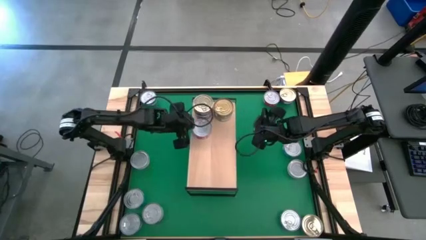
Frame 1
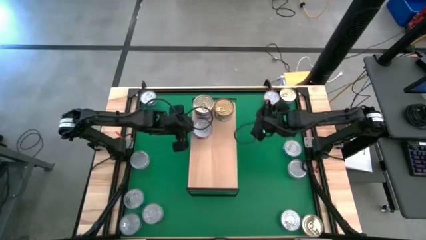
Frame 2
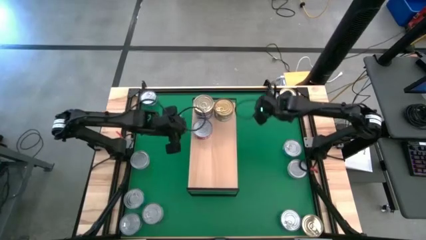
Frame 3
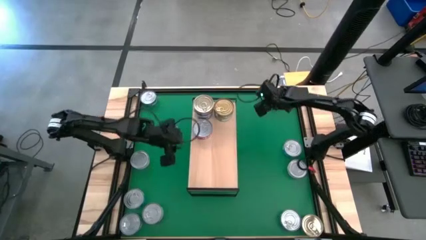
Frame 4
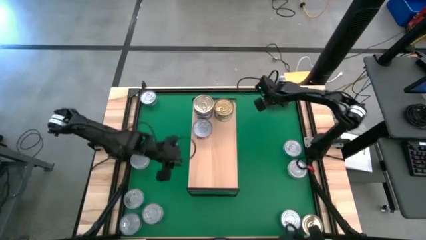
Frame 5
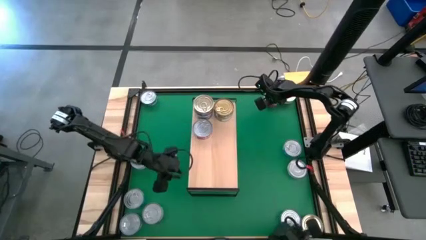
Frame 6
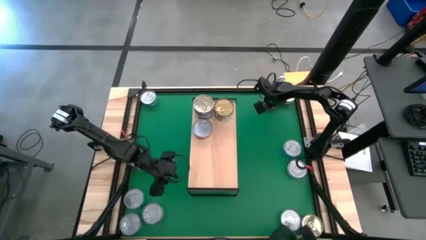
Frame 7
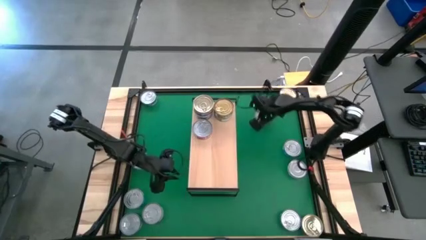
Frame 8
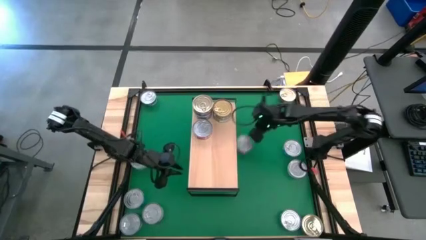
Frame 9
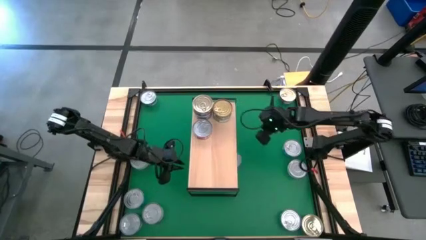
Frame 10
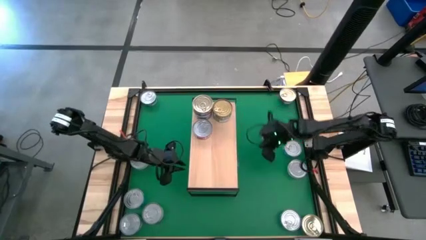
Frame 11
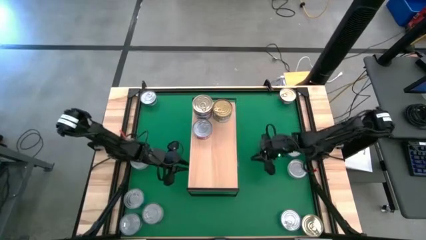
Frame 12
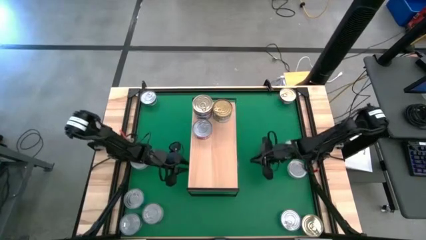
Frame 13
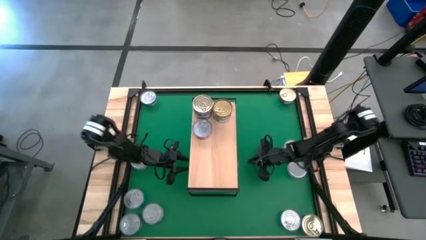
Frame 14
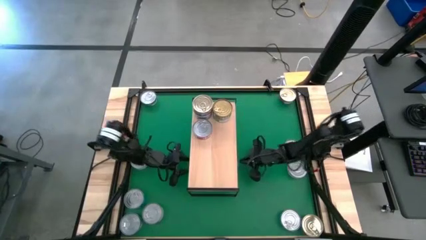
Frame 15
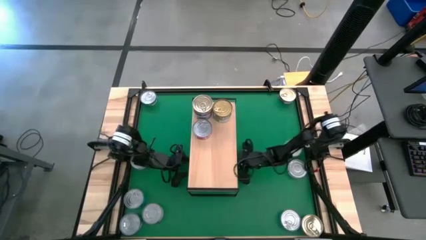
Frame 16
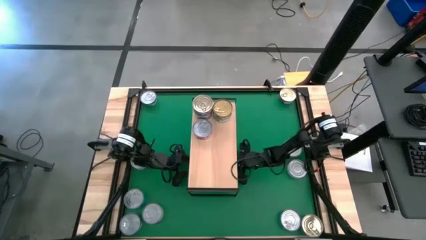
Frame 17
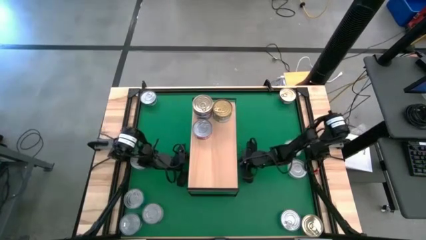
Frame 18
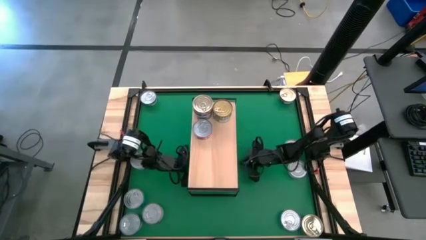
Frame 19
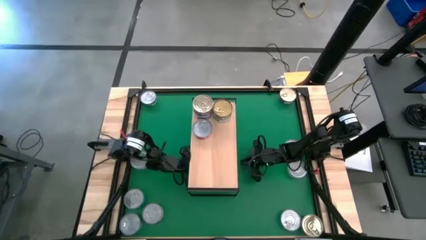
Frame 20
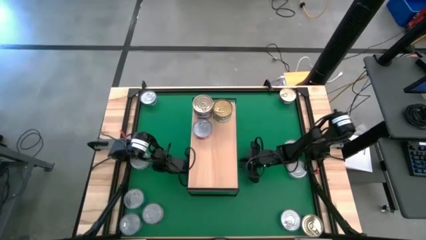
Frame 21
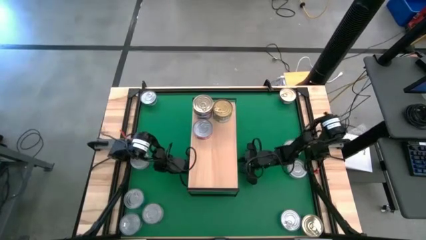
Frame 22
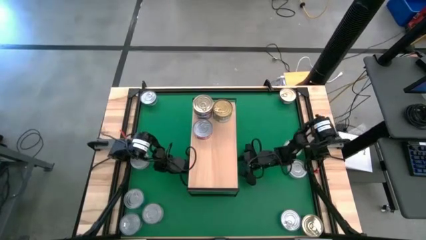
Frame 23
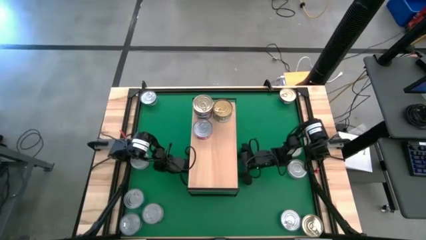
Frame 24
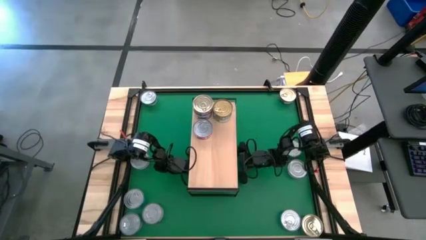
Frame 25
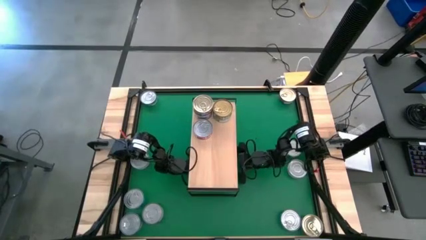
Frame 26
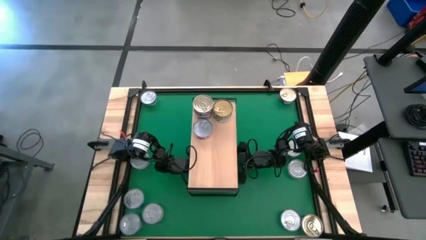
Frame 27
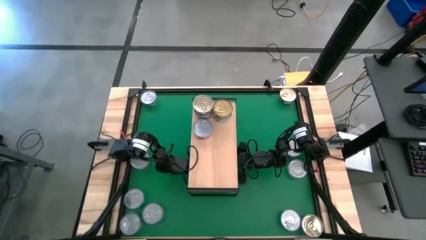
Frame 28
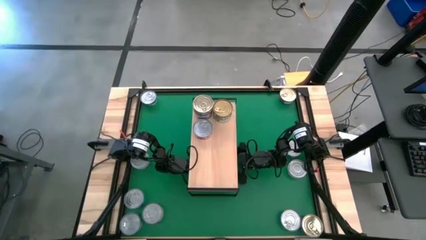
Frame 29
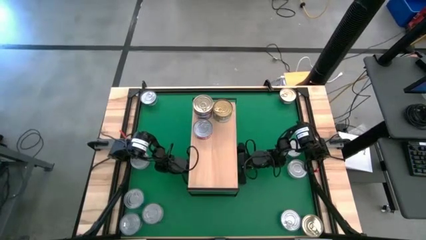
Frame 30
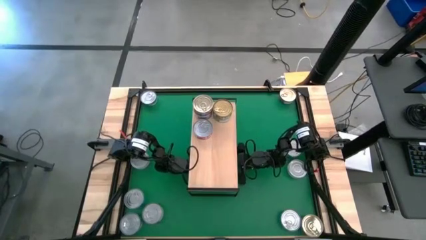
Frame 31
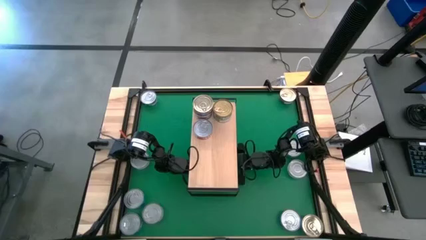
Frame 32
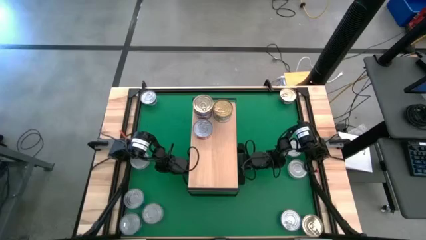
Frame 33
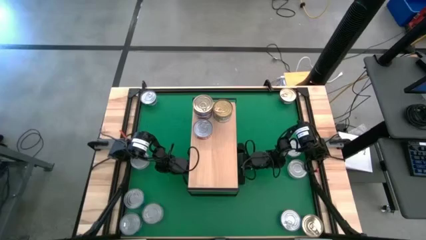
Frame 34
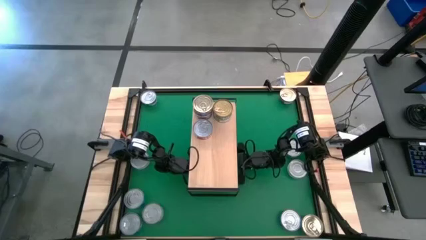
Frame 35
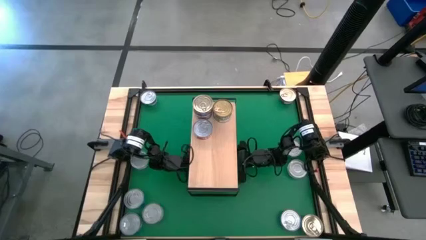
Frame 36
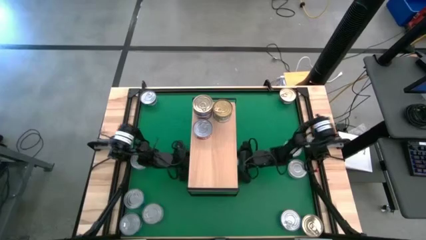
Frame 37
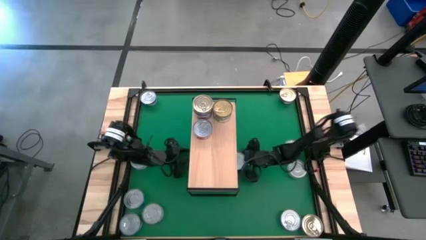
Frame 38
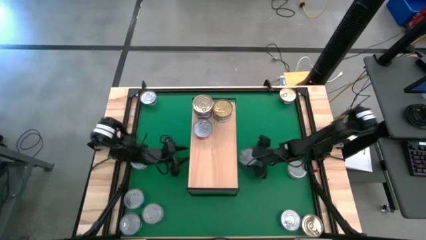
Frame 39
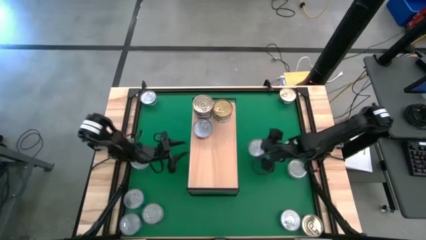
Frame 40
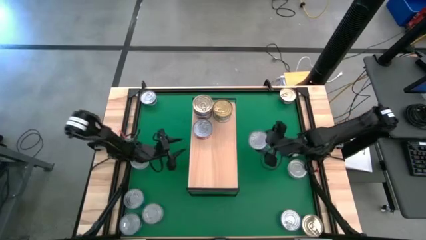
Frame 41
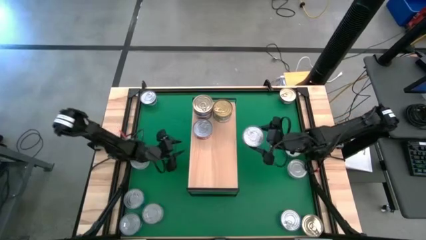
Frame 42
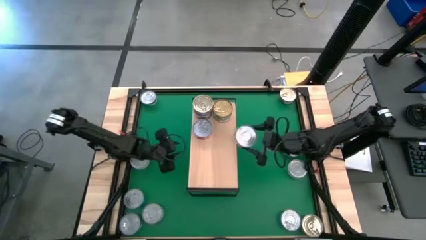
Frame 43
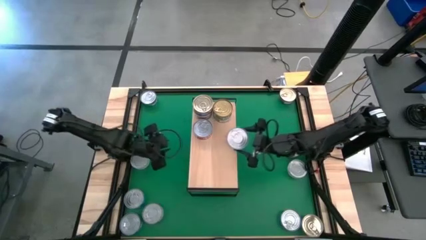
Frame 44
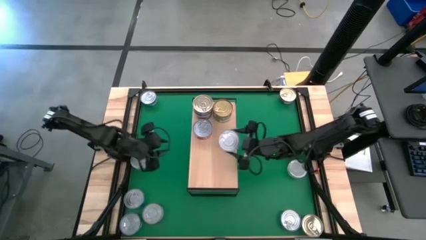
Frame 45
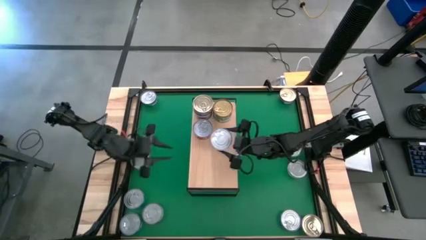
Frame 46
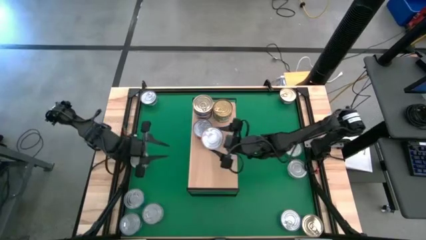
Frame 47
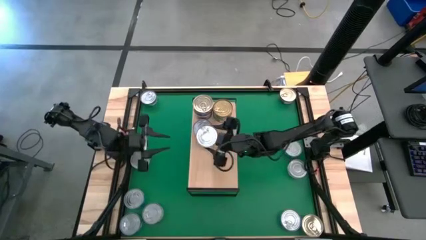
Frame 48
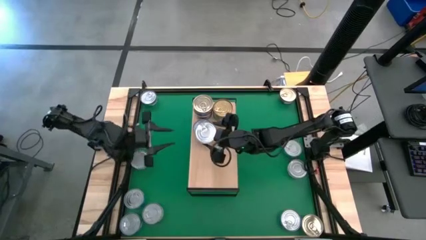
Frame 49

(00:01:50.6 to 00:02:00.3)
Task: Stack canned seafood by type on shelf
Stack the red tuna can on top of the other red tuna can on the shelf

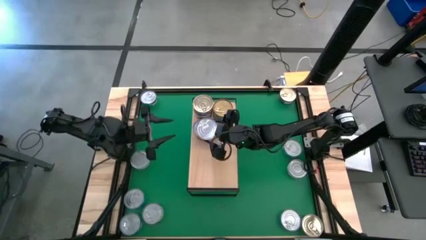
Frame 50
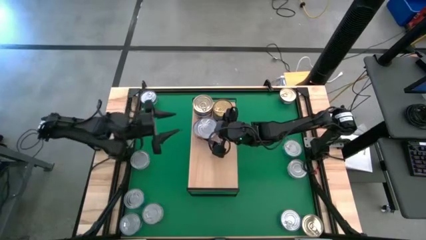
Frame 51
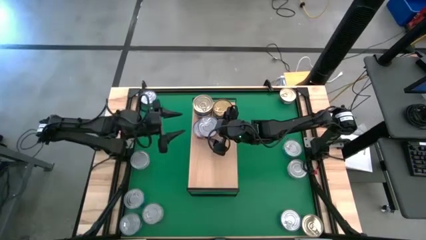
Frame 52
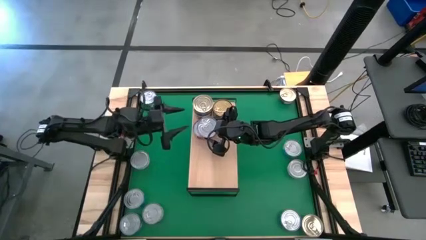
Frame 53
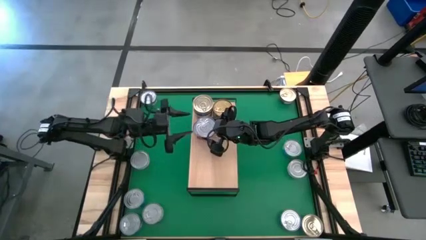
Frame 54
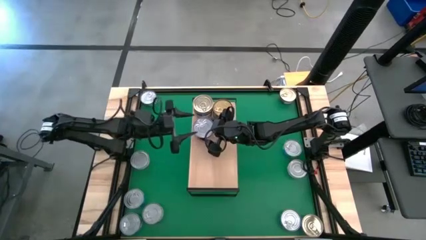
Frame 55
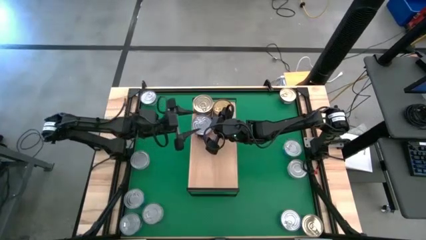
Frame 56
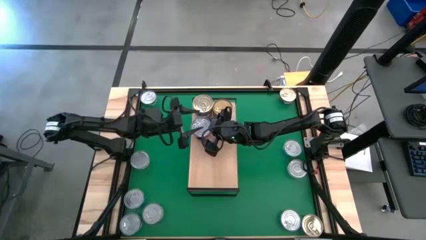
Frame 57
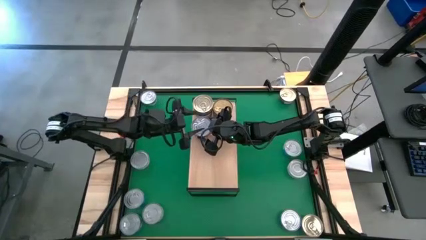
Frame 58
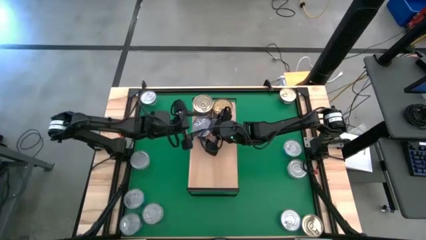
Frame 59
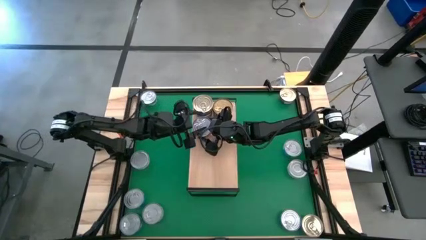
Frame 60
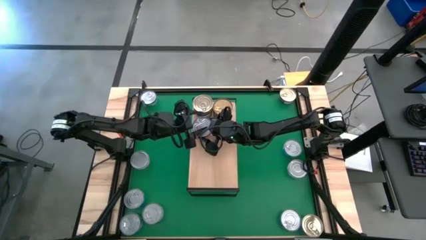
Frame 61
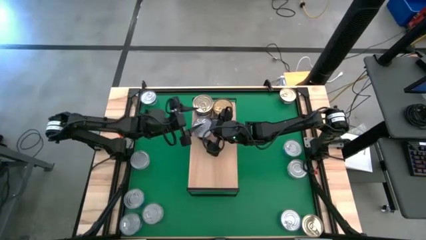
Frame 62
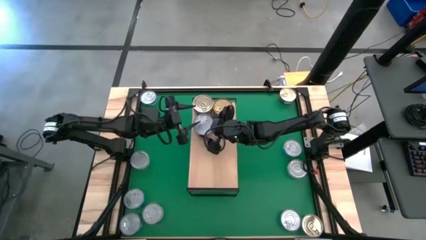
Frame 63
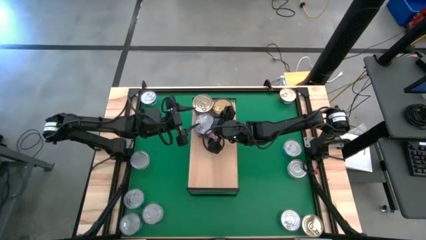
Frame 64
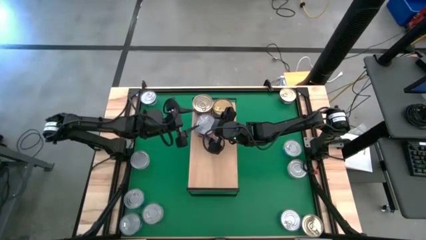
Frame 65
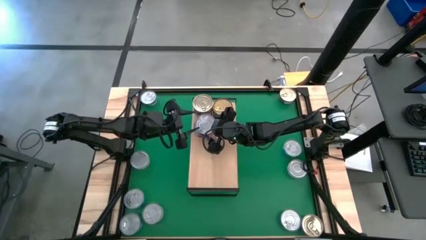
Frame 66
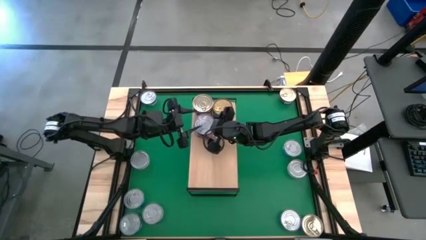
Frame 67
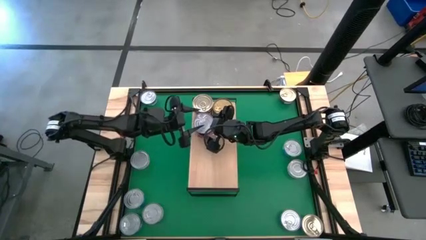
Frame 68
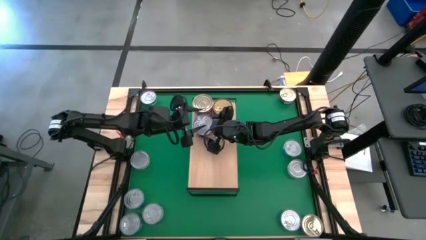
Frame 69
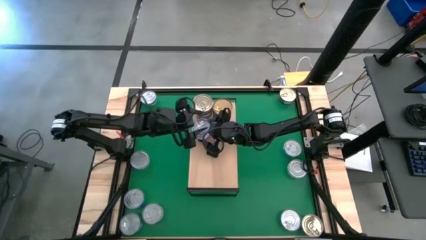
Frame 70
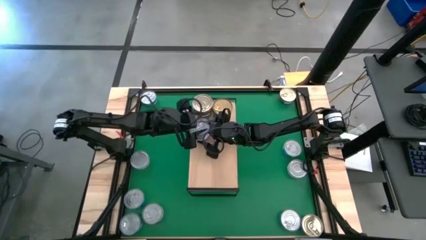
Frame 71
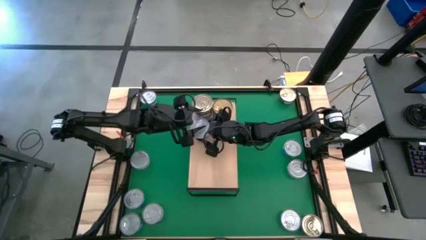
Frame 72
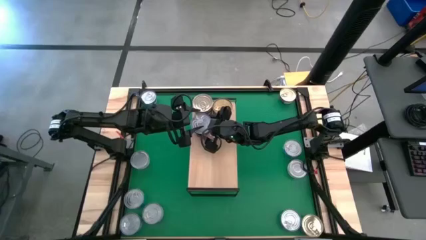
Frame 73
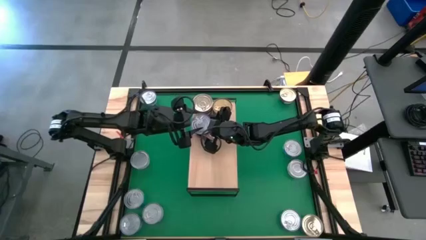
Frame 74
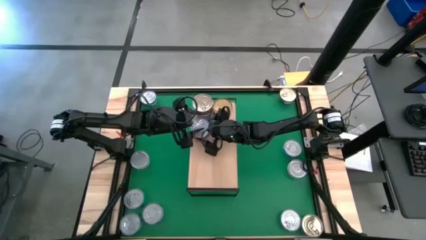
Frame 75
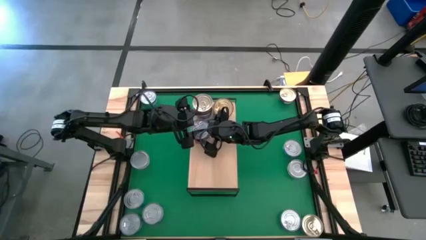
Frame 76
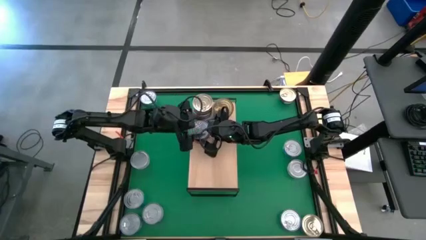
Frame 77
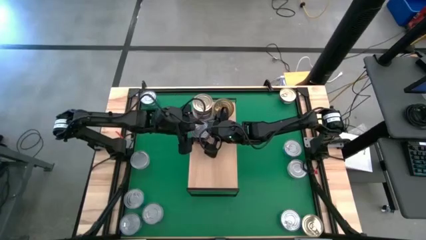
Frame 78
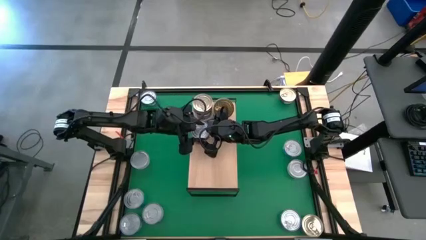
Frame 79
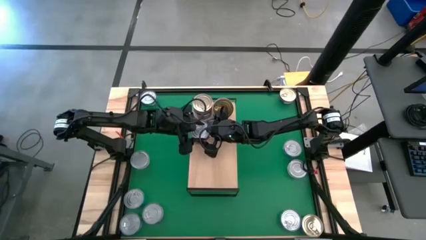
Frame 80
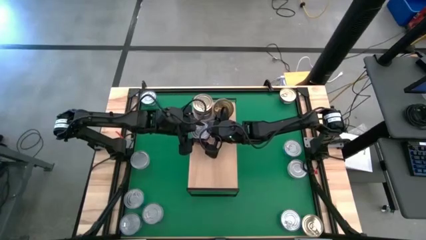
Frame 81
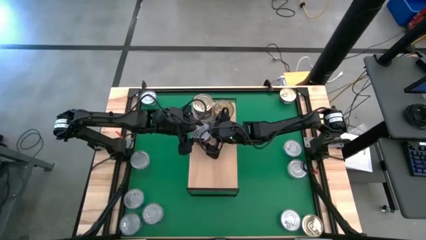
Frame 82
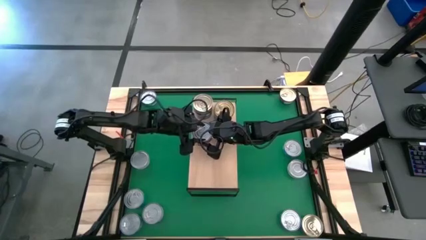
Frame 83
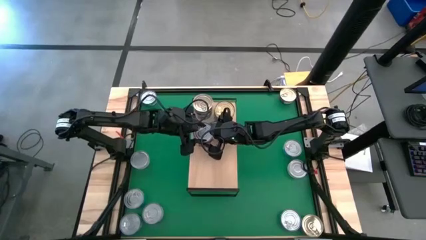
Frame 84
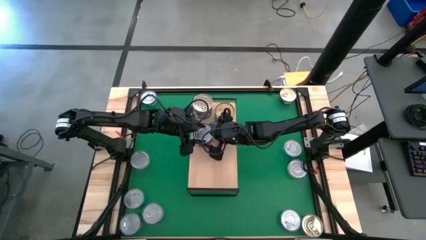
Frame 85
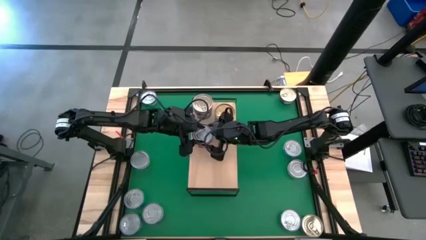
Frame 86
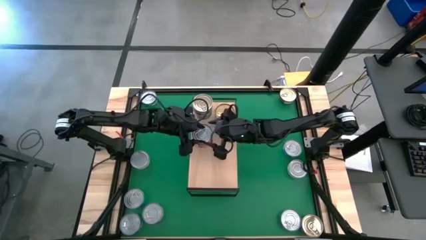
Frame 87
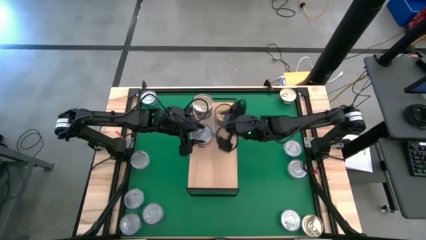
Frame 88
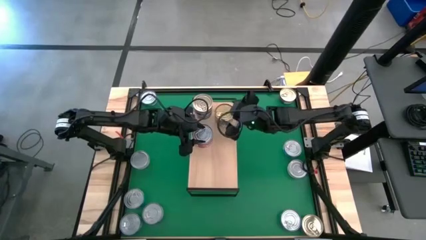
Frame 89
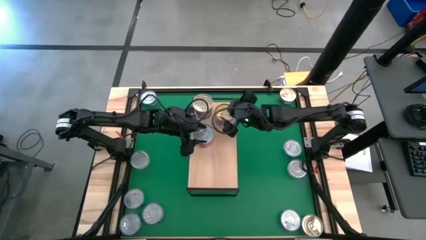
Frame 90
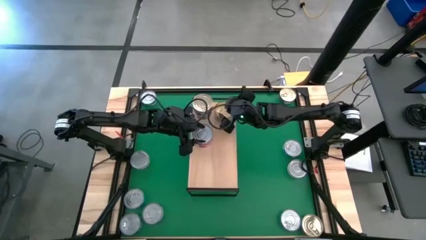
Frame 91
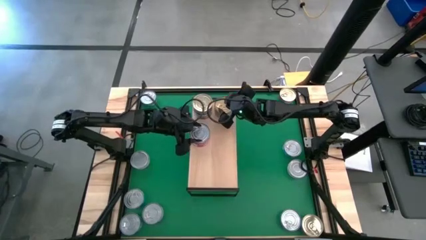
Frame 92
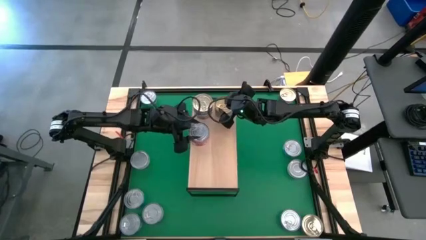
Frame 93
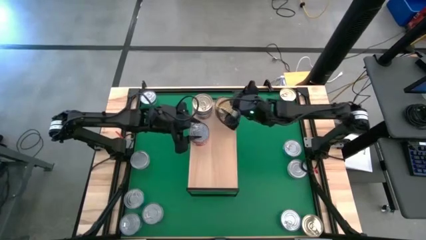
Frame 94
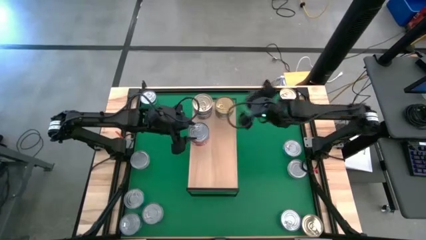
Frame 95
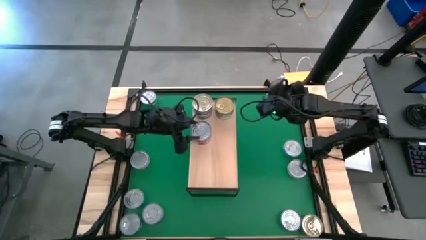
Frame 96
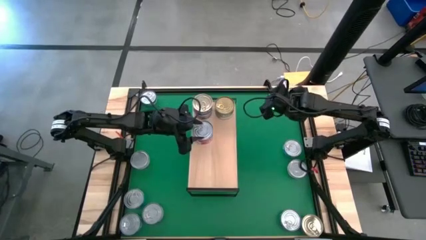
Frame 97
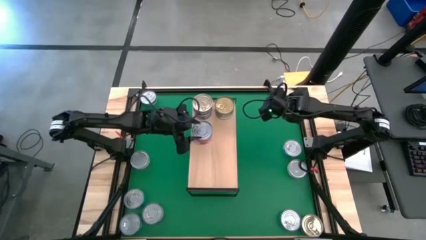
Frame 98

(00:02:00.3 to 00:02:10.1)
Stack the red tuna can on top of the other red tuna can on the shelf
